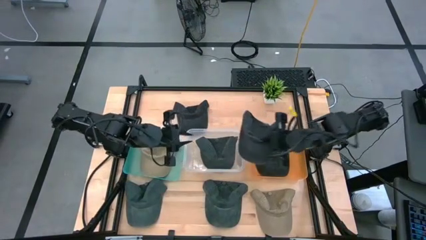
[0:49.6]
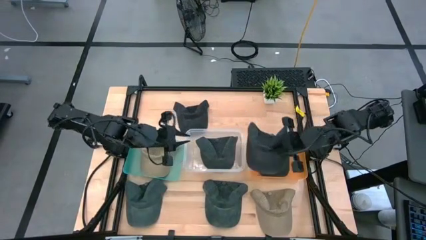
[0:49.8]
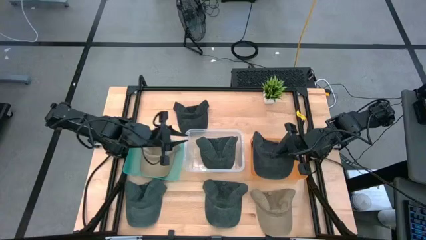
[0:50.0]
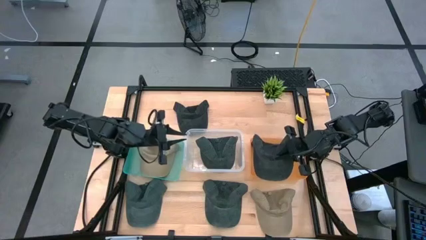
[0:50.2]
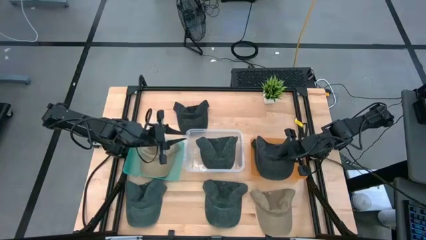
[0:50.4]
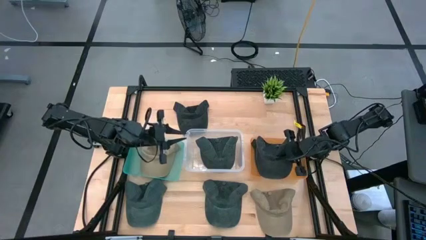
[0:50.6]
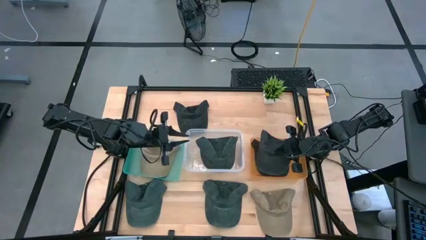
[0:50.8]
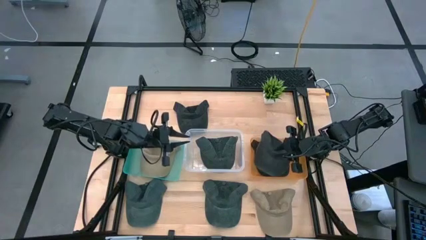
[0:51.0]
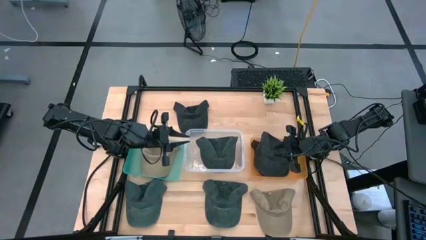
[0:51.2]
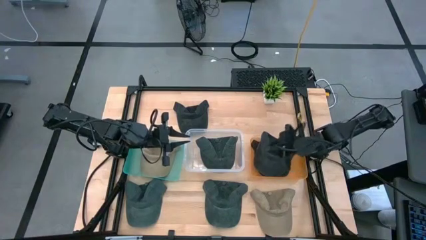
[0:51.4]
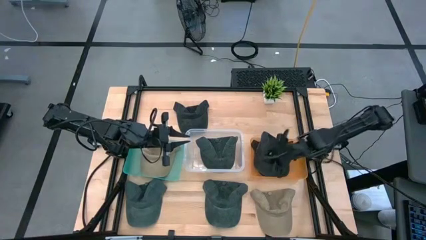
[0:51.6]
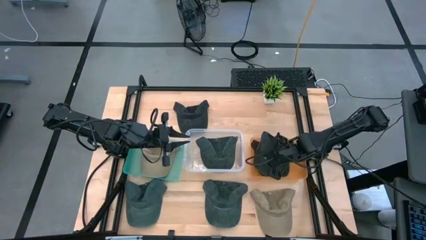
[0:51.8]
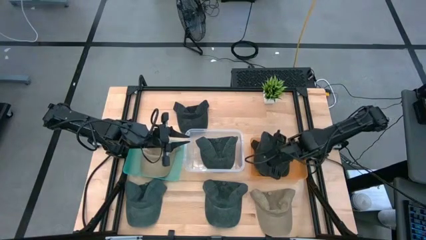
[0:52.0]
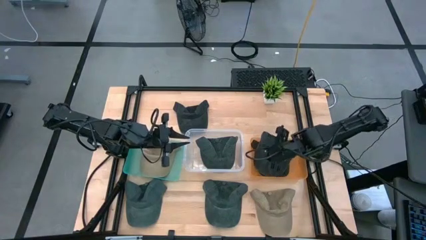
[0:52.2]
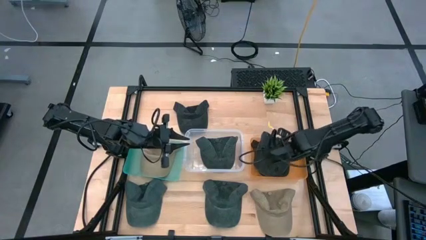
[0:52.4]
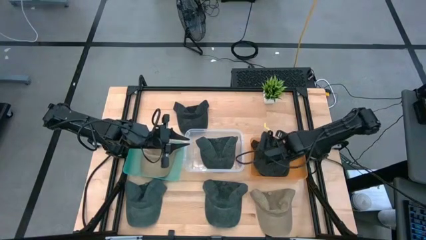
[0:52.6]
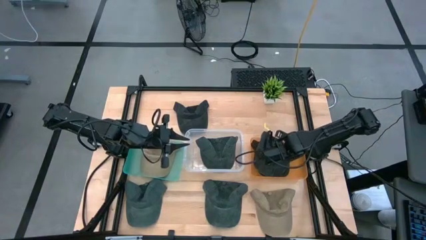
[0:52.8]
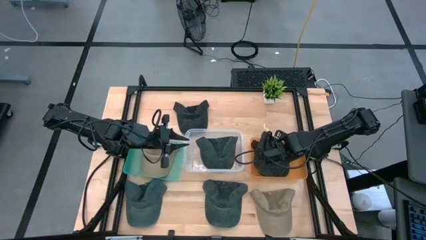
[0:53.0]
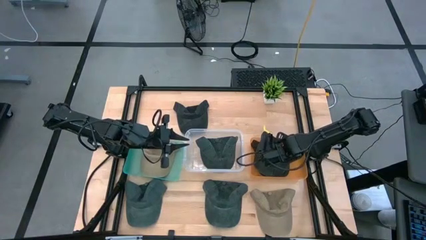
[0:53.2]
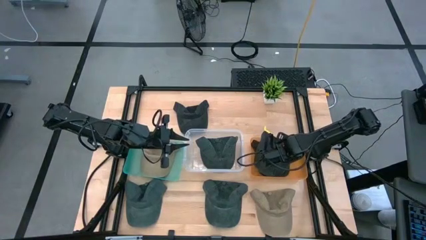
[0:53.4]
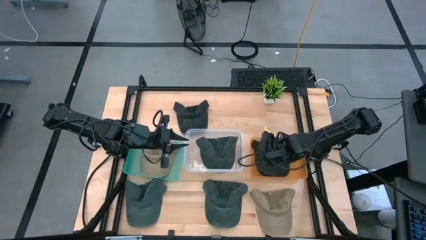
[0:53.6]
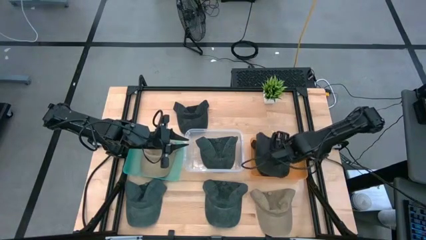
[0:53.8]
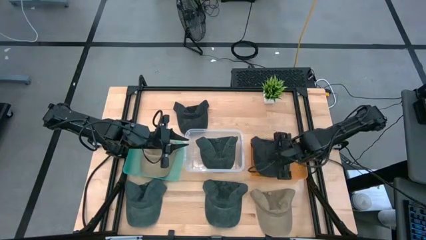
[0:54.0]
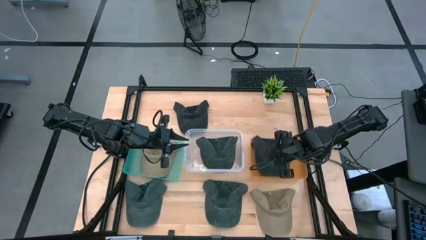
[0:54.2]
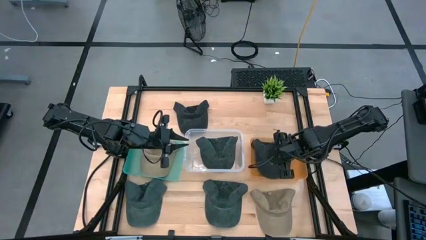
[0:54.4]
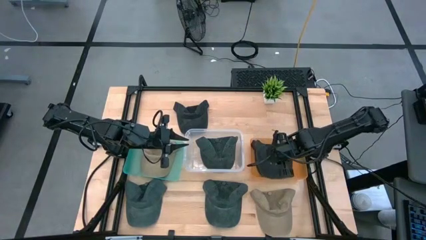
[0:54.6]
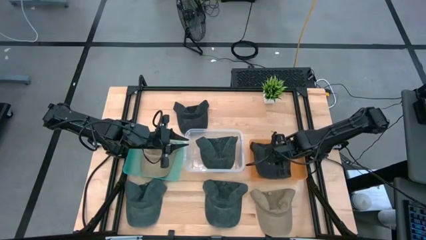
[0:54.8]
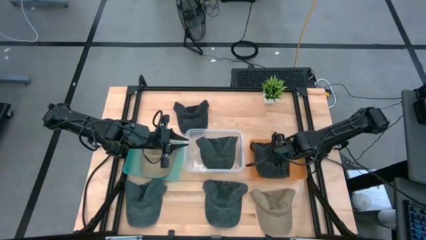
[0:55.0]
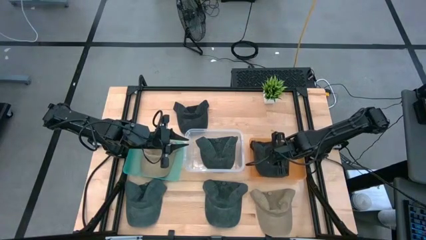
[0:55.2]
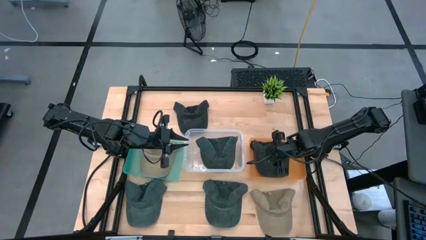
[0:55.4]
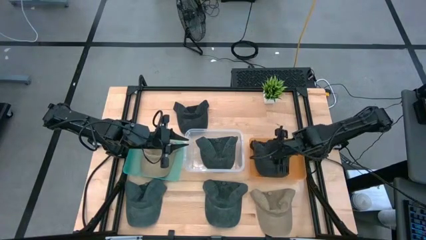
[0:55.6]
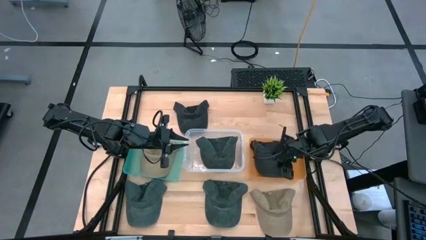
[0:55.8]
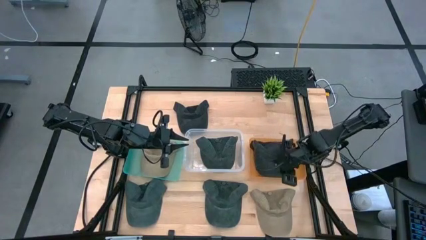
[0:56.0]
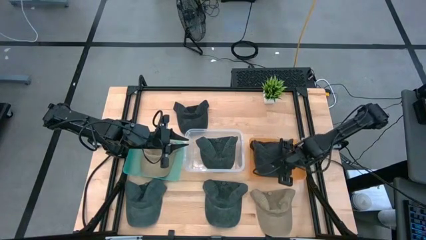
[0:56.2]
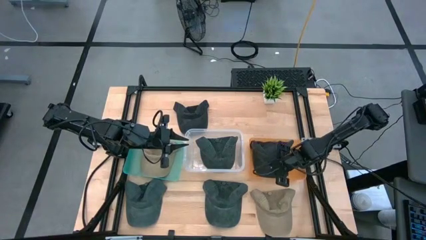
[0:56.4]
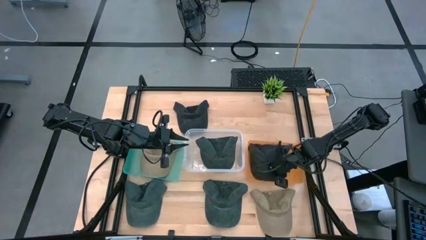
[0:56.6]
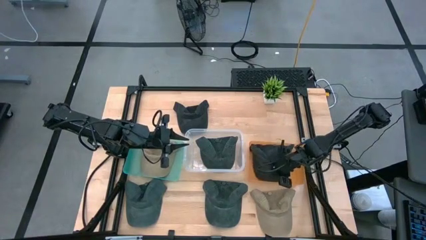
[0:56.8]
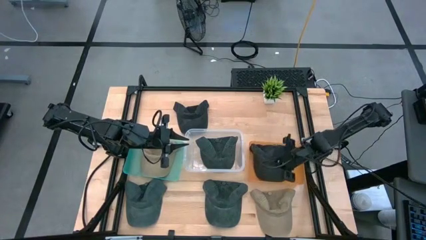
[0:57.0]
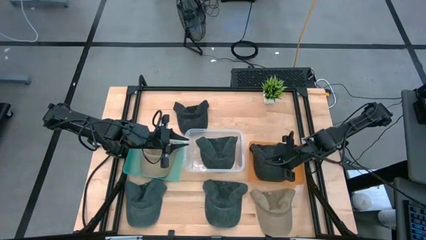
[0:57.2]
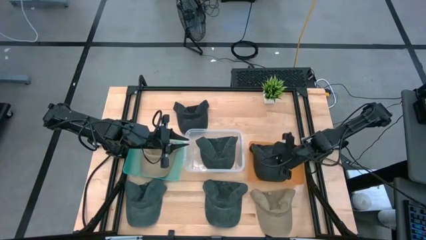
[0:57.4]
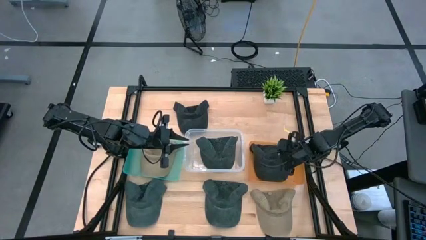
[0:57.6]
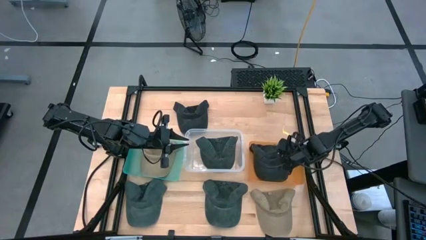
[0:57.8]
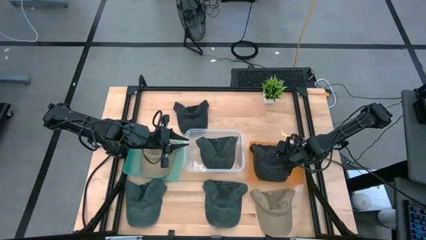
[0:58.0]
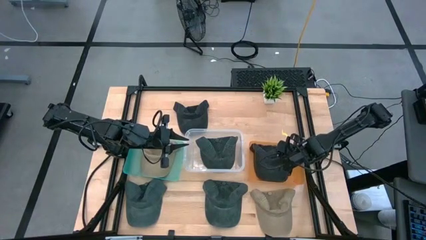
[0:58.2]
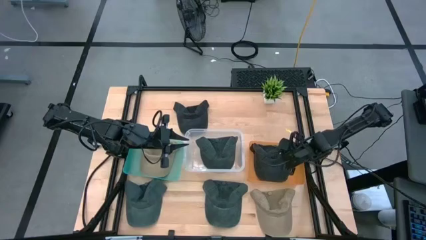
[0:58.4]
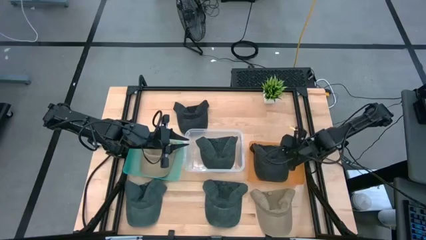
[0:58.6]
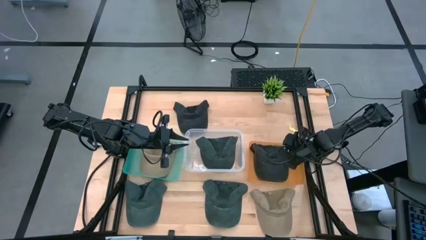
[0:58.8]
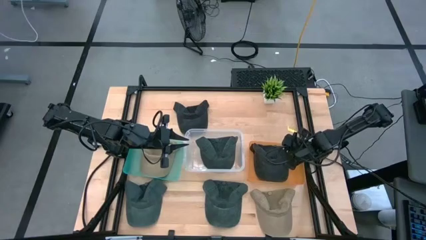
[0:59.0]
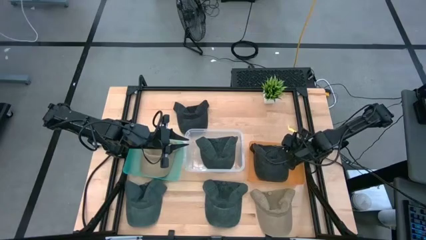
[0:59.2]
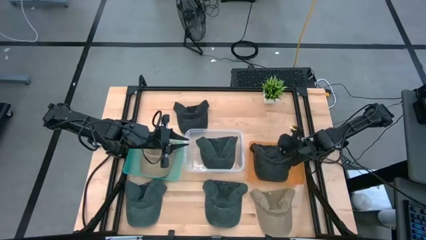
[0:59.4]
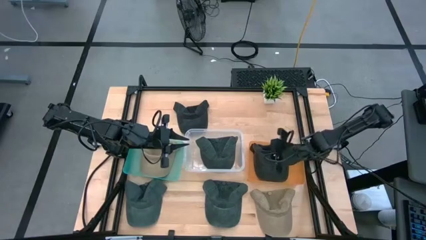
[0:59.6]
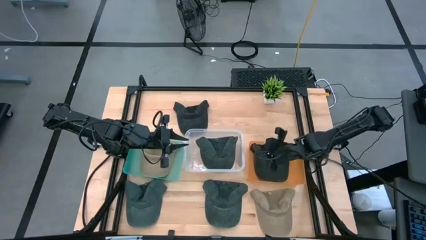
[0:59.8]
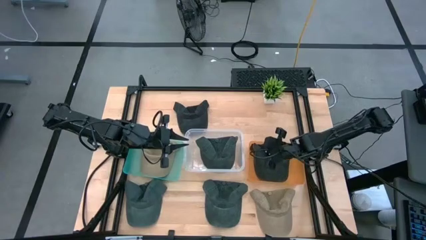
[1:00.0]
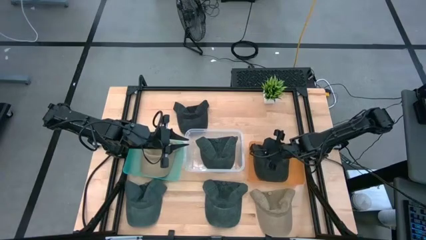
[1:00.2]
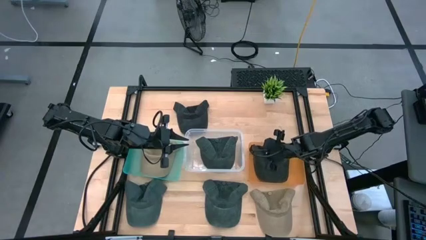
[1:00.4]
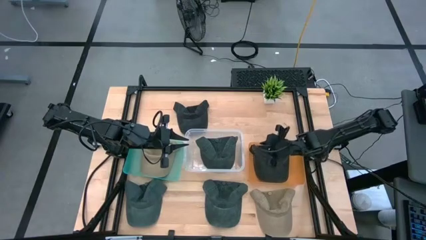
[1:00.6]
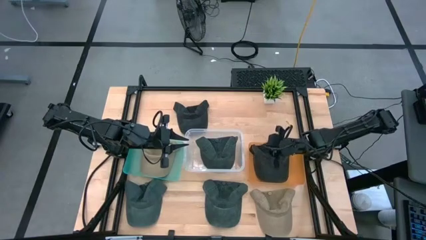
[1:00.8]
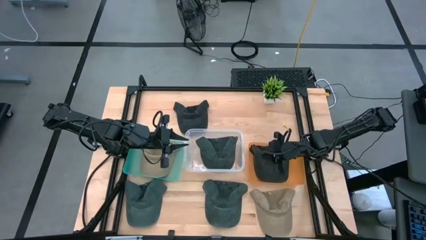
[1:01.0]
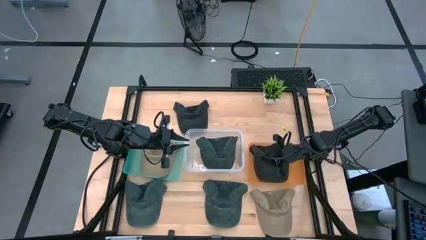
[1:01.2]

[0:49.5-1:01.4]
Task: Pick & Place hat
Put the bottom black cap into the orange bin

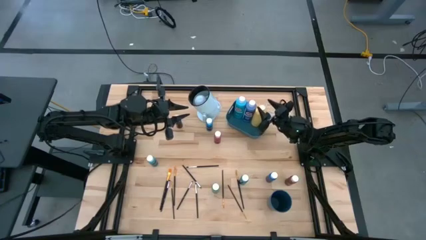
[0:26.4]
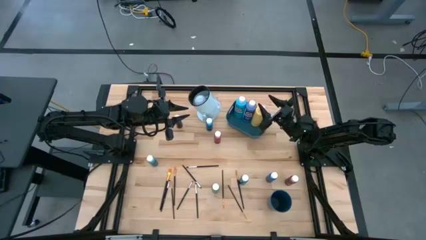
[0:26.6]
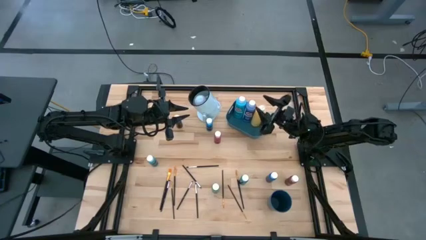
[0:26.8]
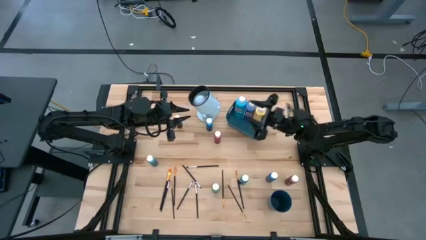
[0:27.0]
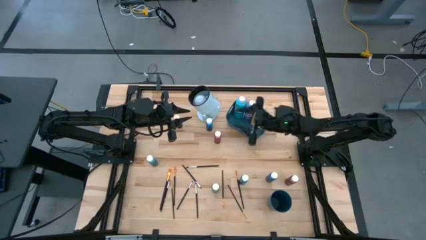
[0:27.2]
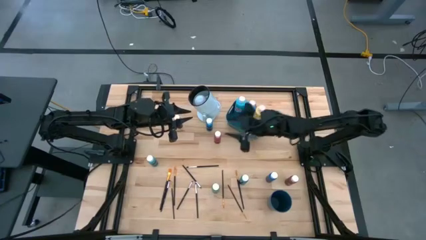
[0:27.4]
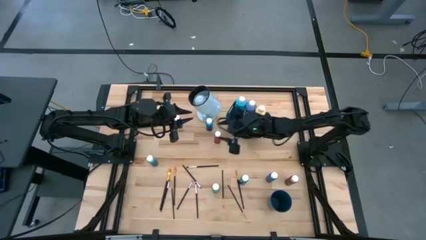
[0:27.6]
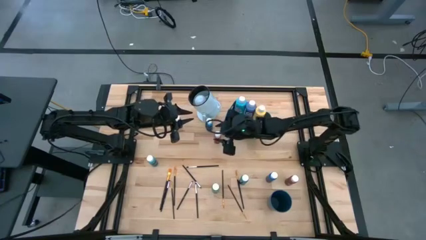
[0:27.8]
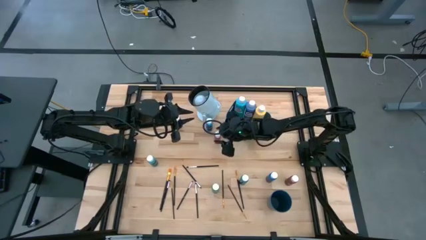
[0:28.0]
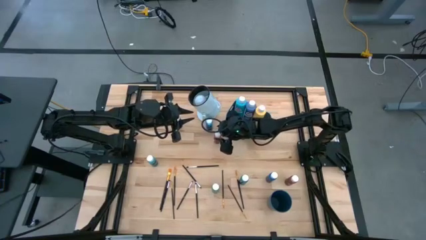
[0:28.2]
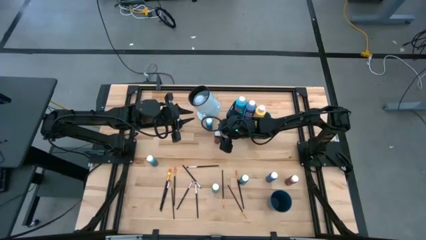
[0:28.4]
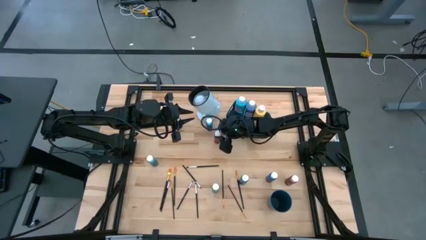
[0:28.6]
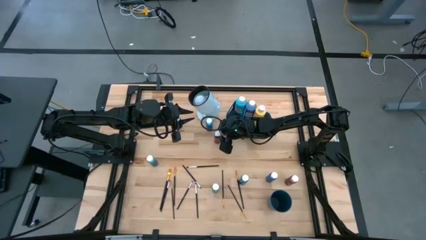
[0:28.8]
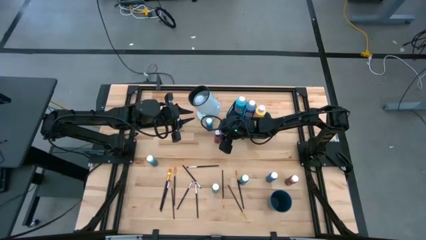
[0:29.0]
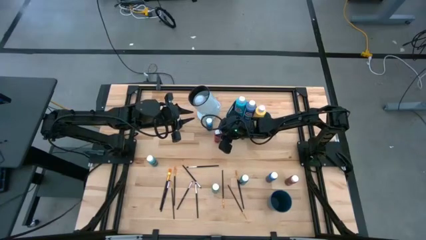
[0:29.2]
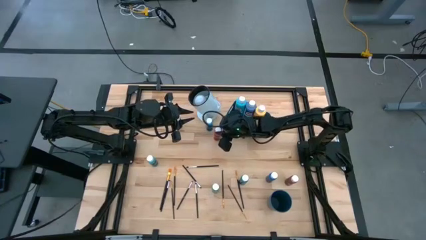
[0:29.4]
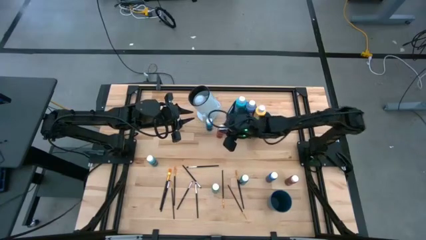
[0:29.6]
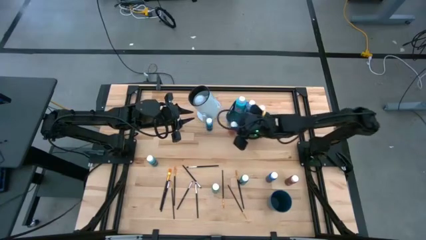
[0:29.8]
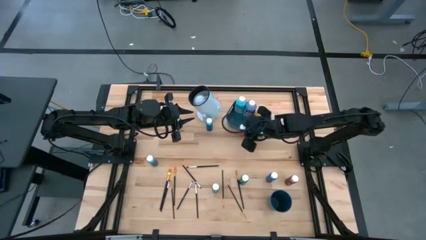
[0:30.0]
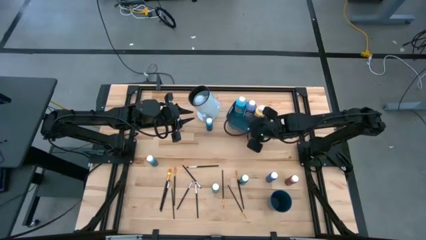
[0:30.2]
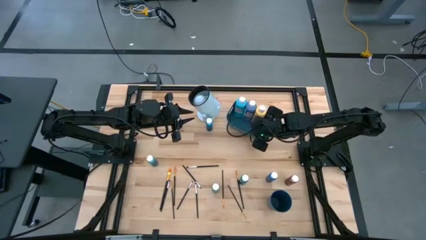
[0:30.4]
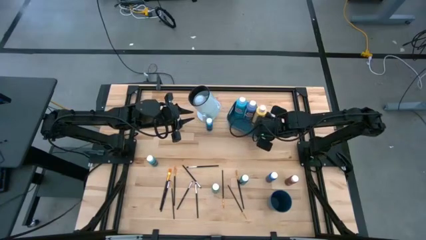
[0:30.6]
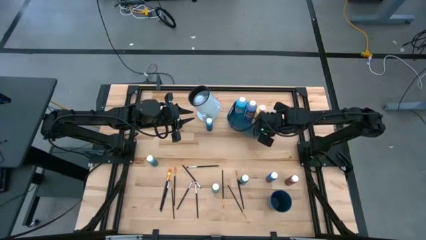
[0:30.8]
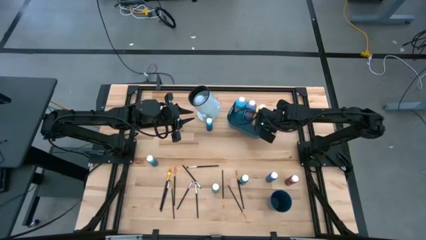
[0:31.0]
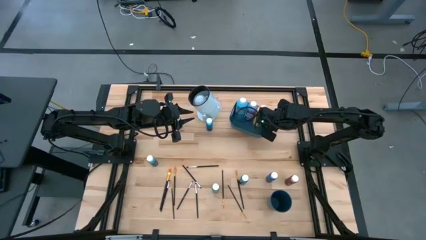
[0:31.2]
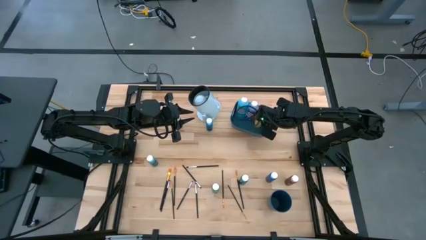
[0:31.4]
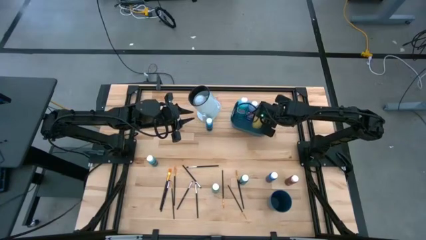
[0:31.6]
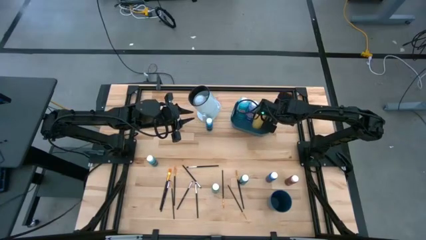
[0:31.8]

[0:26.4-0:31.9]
Task: Pick & Place Paint Supplies
Put the pink paint bottle into the blue bin
